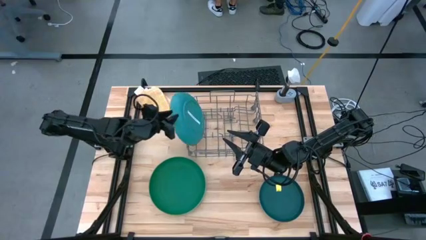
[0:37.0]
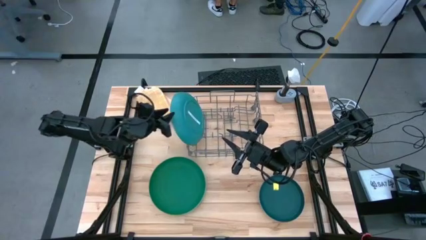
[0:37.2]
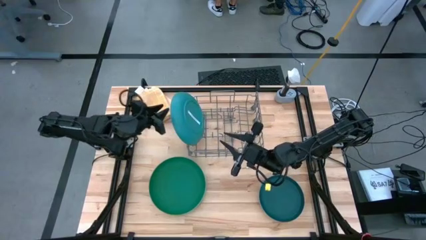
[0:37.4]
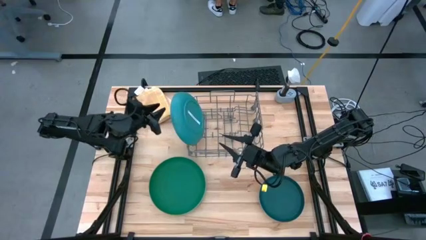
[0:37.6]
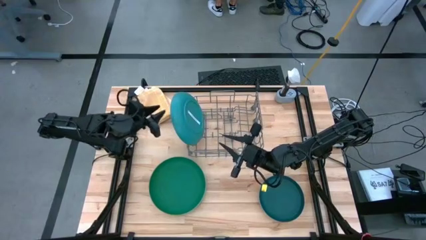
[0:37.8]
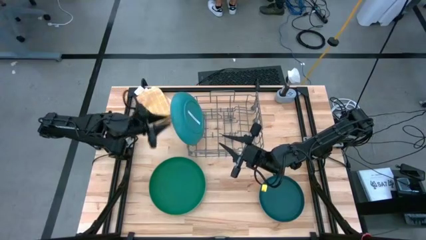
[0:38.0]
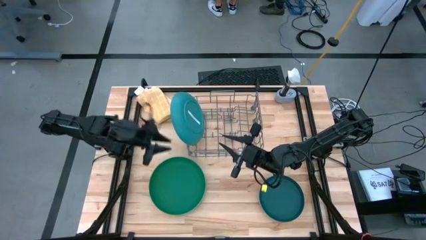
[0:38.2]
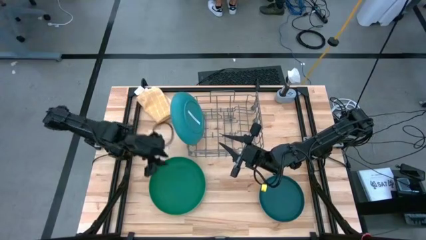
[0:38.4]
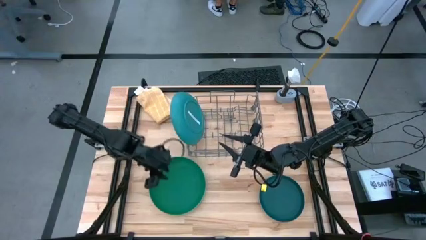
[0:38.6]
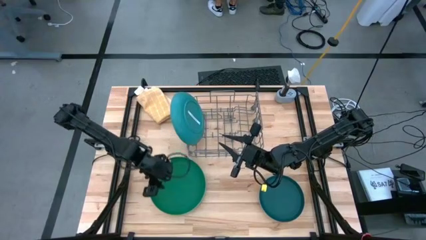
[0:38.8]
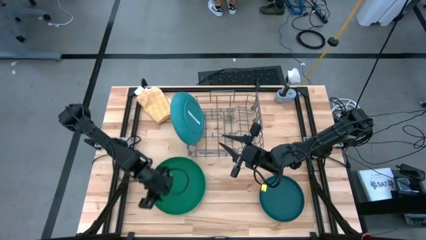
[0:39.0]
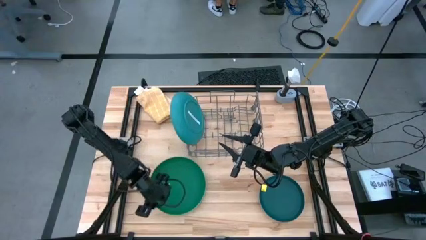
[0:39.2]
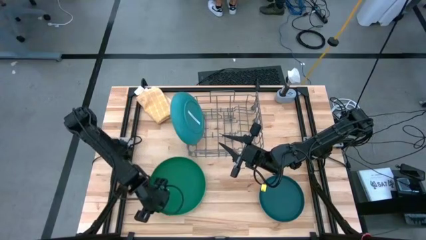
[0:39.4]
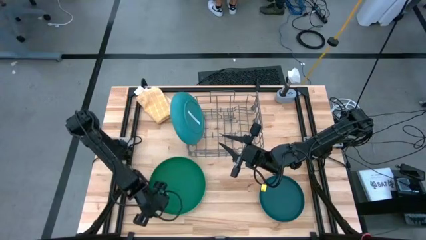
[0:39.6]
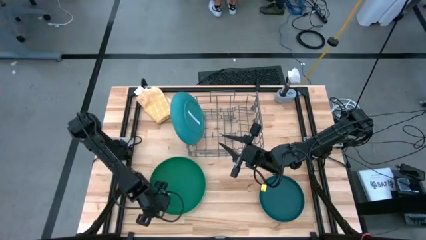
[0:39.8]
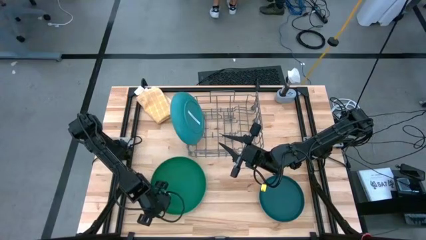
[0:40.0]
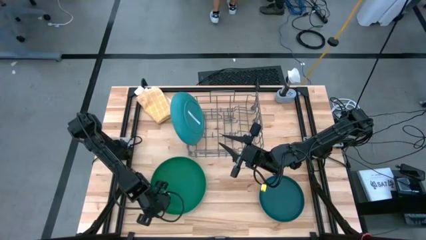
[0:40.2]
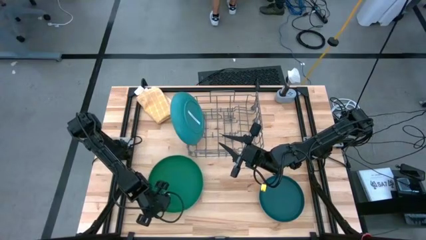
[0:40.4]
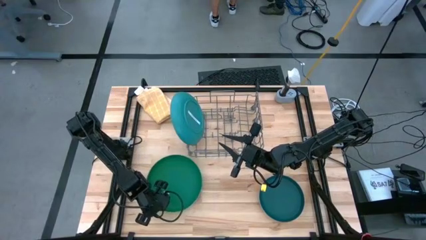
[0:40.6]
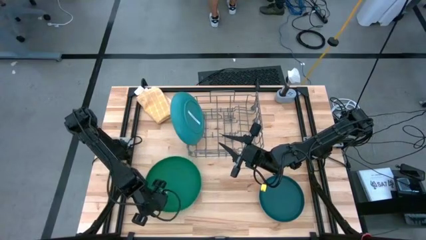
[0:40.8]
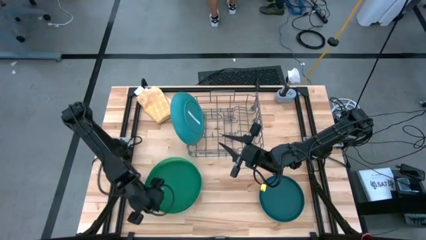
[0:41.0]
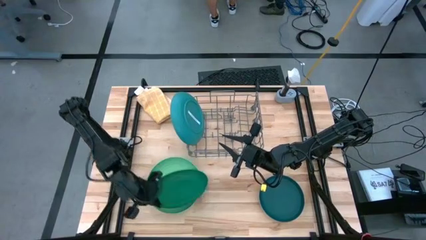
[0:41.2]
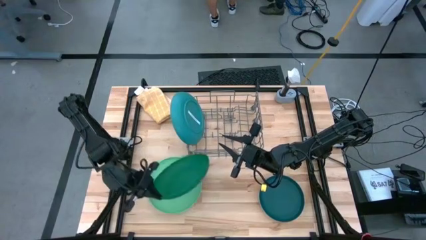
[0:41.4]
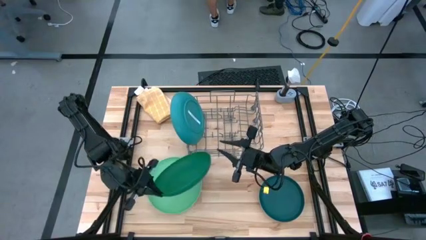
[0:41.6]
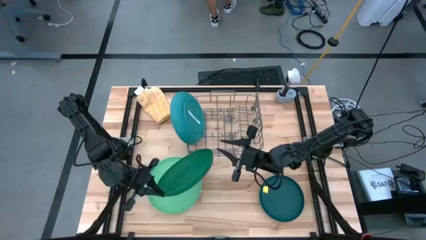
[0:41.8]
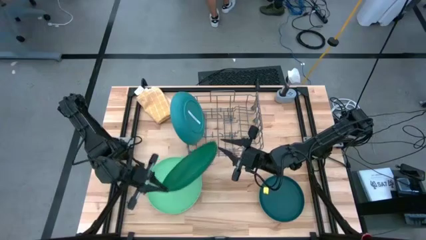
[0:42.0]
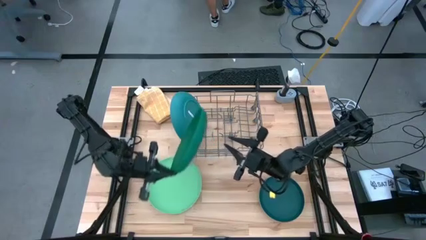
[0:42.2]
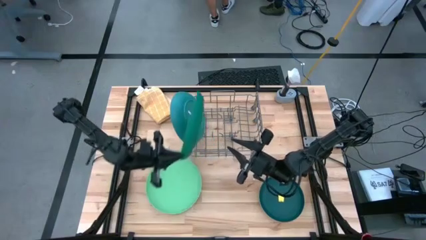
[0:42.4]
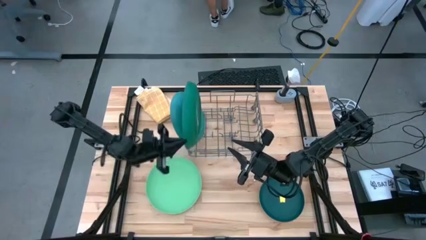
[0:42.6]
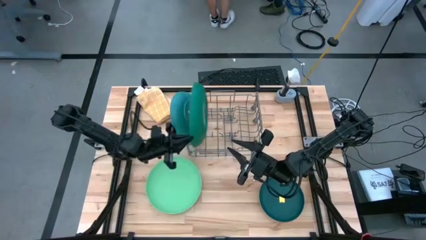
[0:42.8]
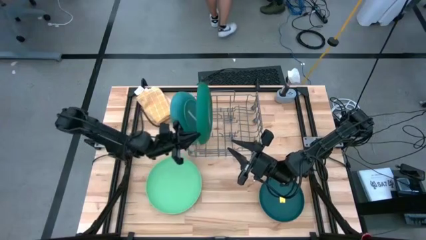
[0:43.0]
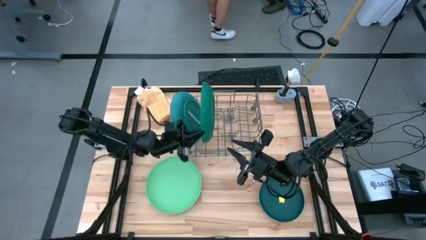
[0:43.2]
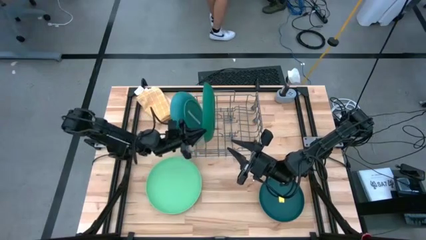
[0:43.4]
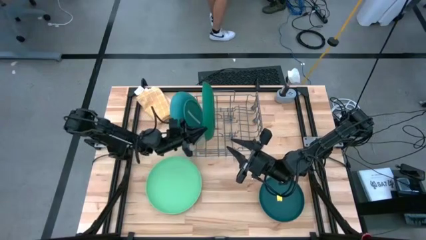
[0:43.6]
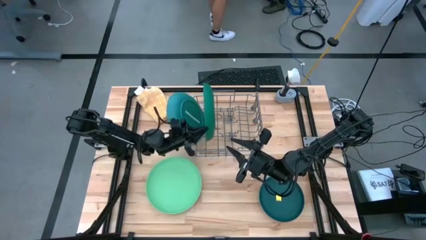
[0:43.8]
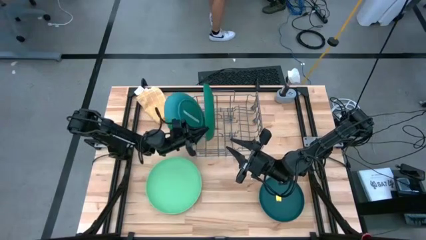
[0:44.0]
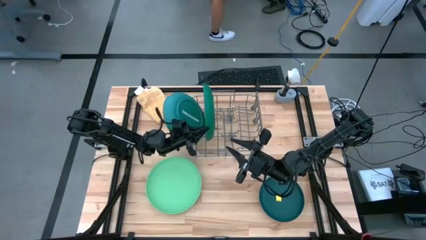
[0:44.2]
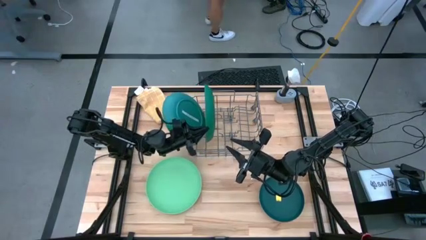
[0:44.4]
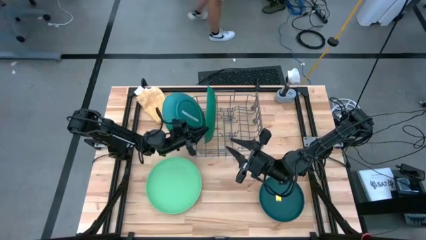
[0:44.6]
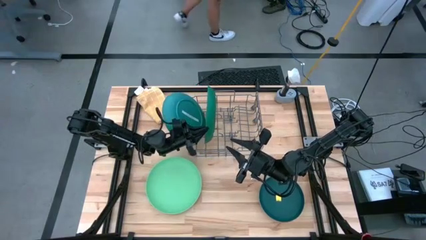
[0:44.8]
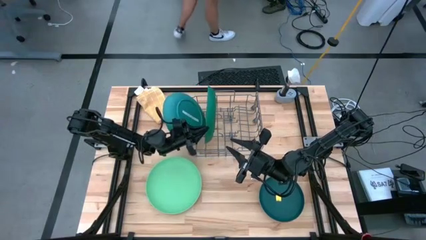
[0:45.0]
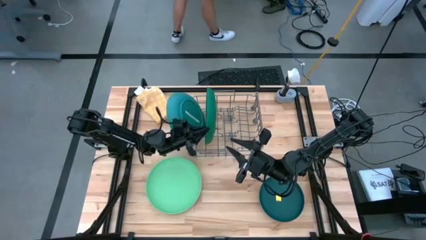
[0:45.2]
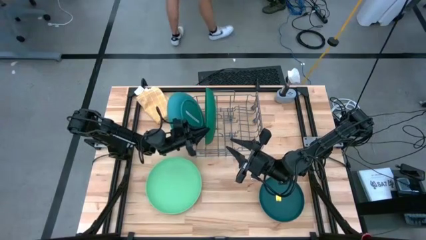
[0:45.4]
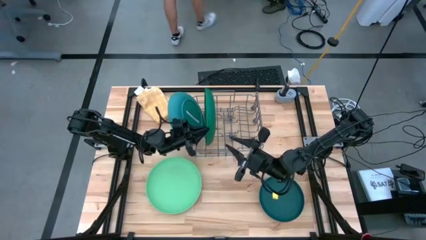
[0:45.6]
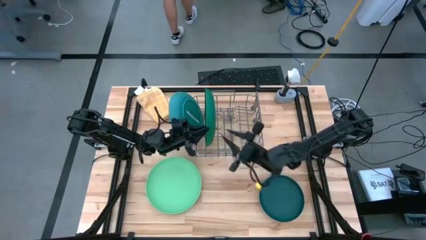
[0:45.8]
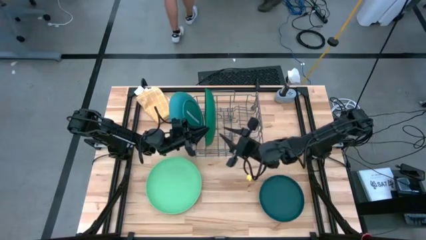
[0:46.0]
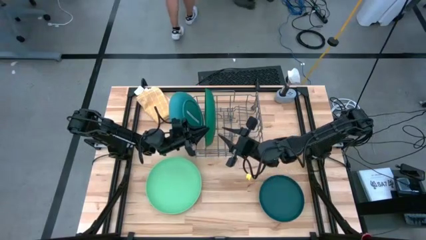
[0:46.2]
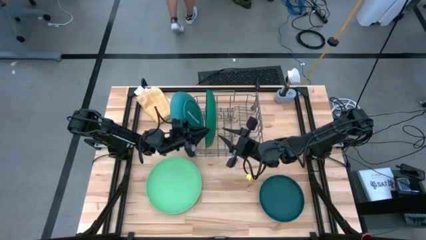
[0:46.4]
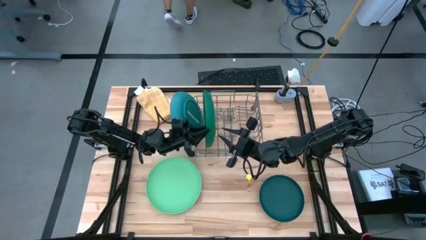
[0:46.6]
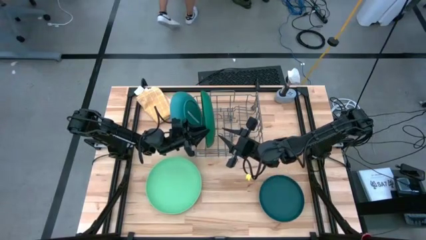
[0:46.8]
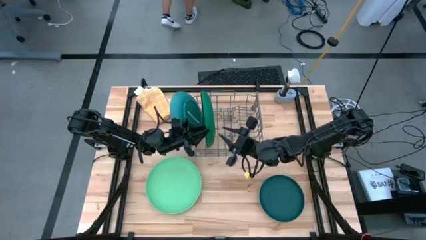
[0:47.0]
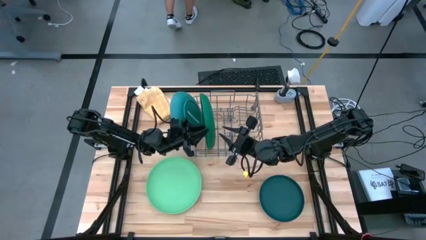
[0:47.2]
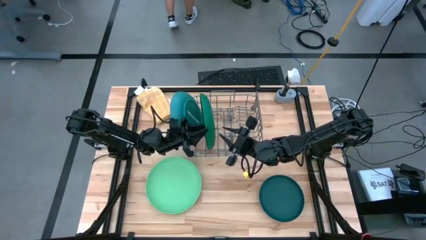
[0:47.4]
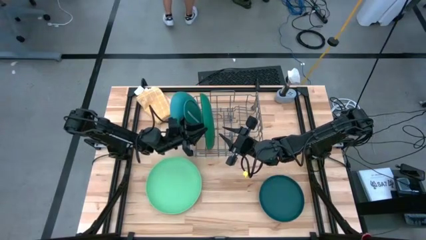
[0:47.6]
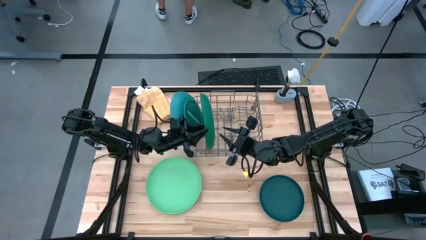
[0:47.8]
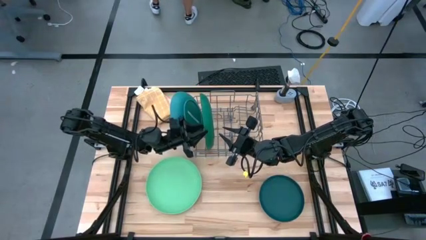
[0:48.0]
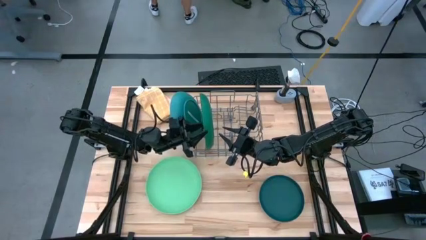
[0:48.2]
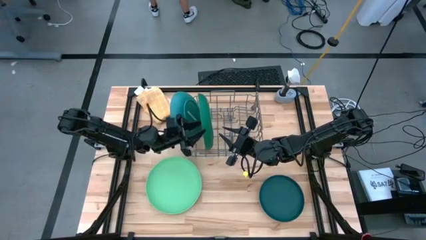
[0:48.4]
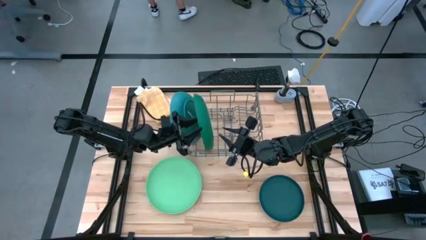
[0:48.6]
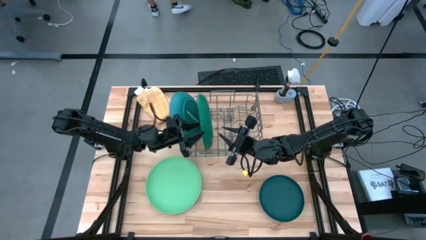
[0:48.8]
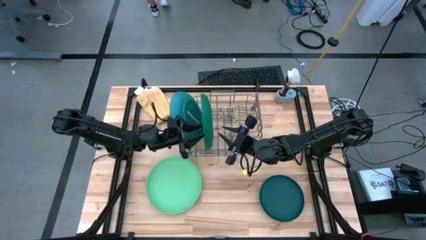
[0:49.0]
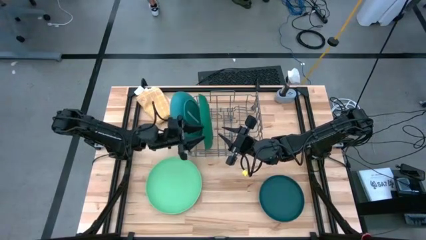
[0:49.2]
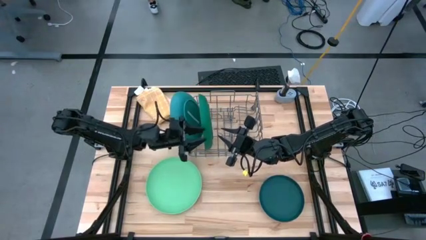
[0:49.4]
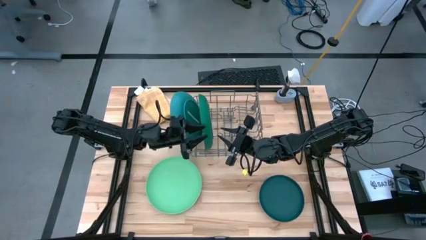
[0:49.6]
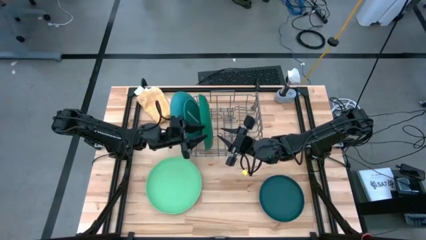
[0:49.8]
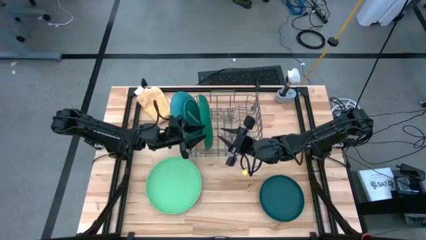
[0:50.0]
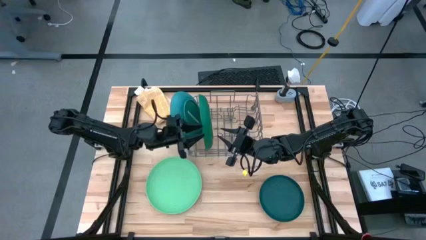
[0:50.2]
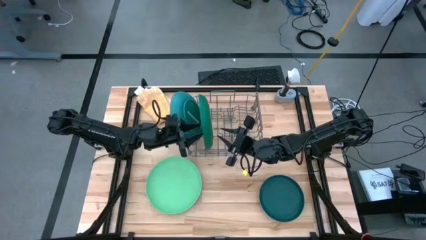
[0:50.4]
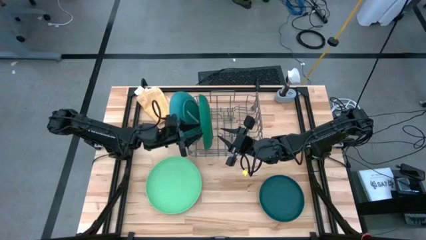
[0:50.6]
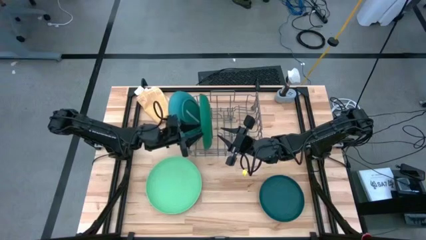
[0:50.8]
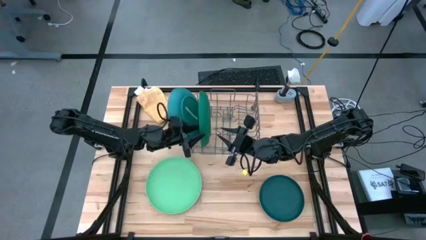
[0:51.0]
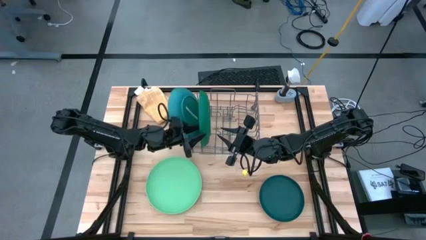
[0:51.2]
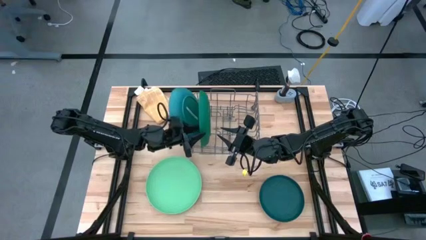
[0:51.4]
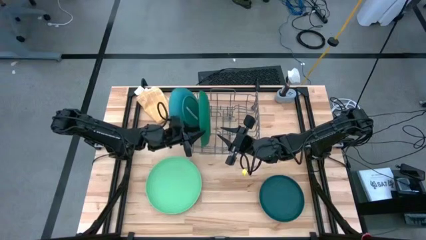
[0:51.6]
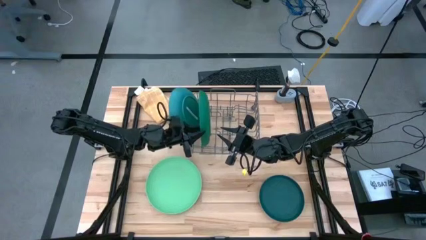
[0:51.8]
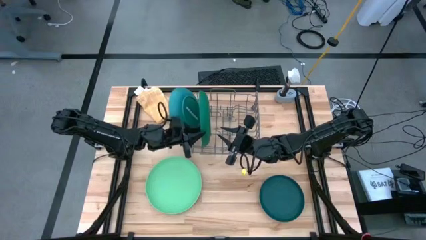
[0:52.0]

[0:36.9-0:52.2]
Task: Sort dishes
Put the green plate into the dishwasher rack
